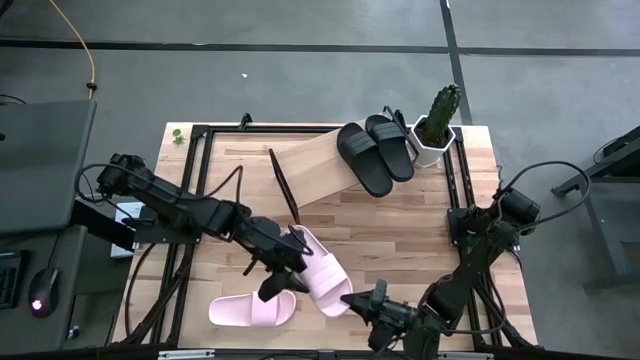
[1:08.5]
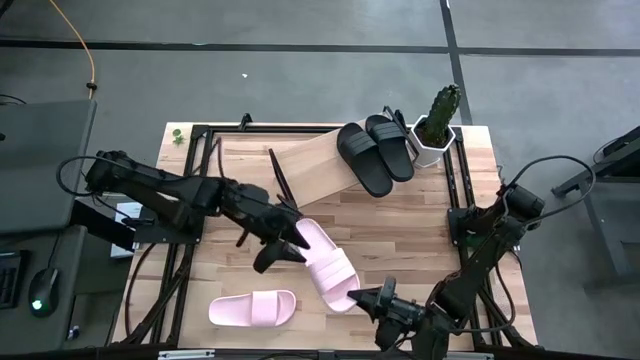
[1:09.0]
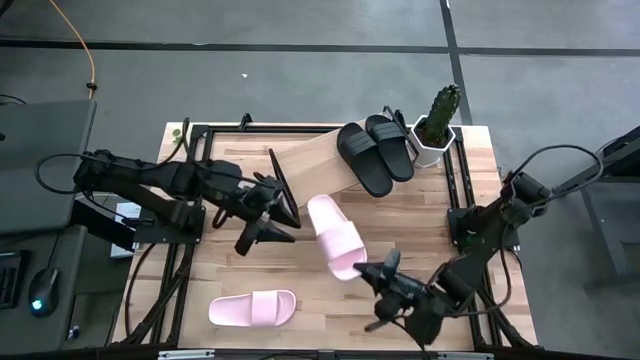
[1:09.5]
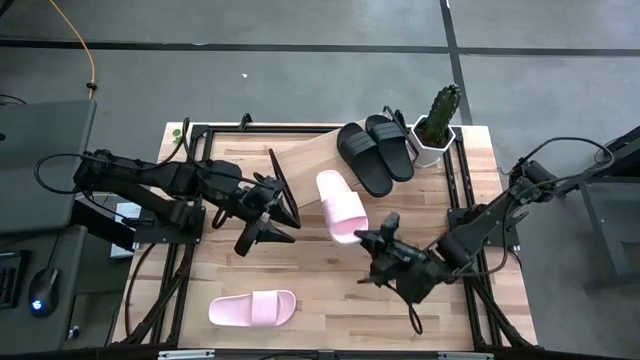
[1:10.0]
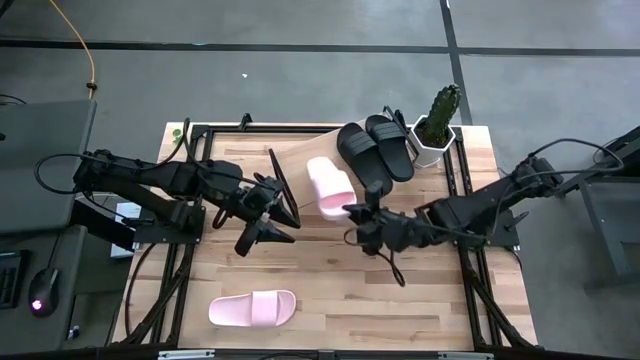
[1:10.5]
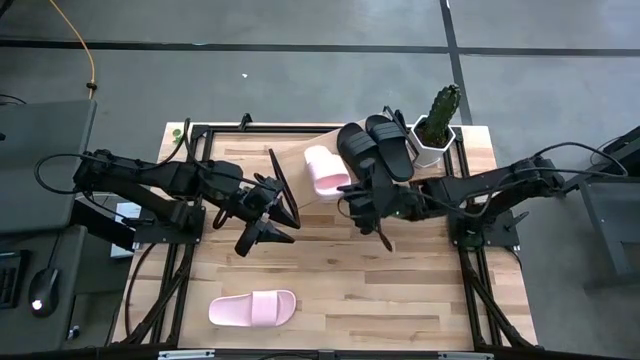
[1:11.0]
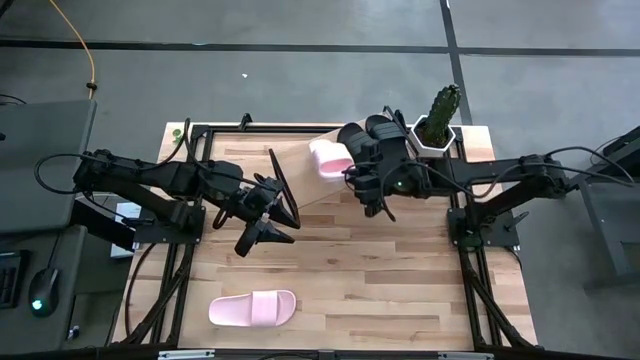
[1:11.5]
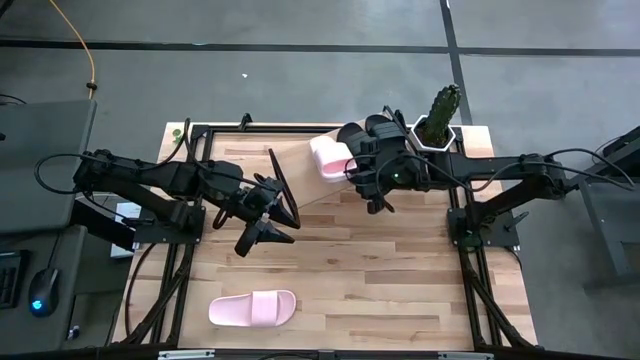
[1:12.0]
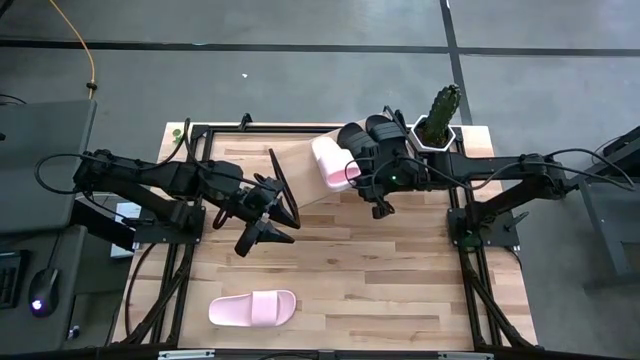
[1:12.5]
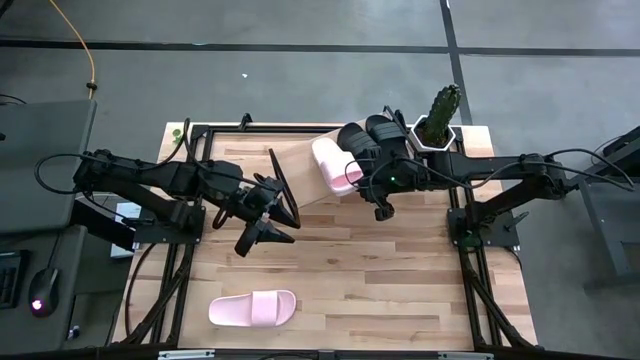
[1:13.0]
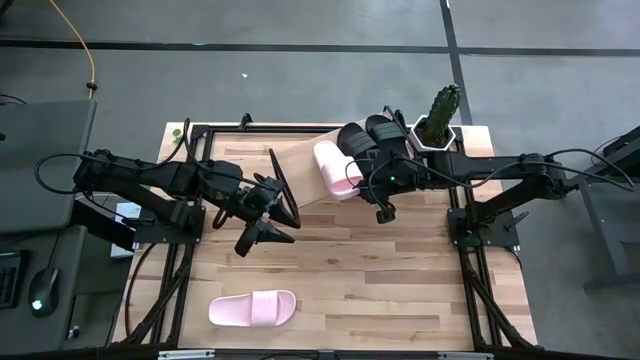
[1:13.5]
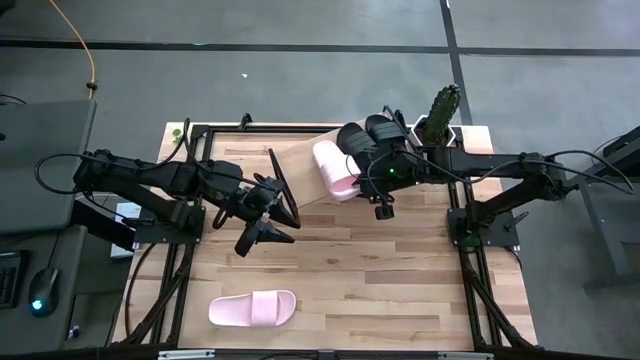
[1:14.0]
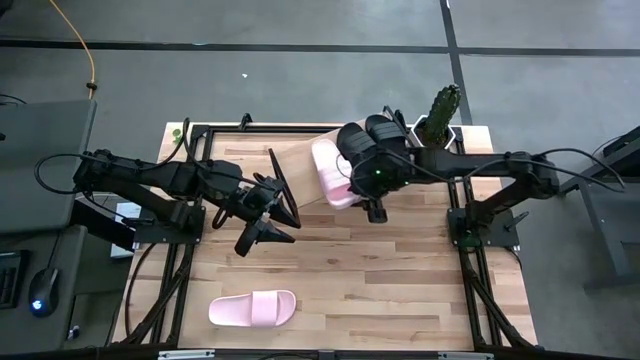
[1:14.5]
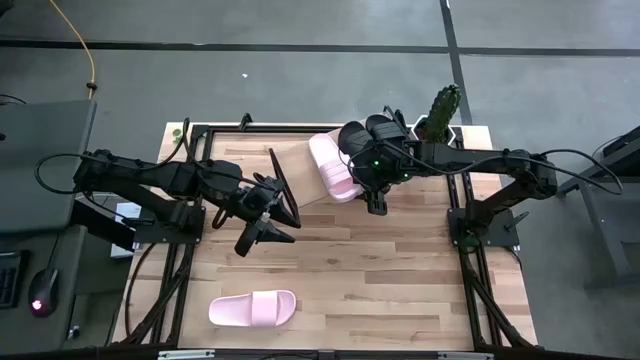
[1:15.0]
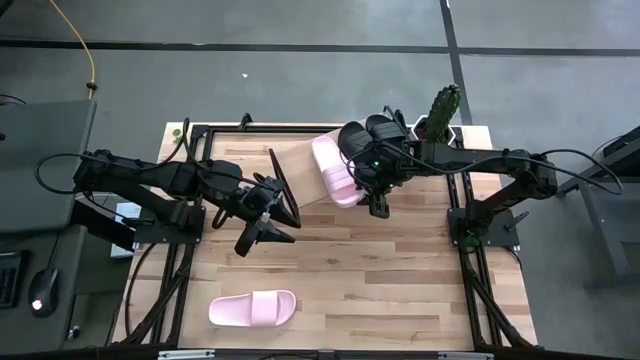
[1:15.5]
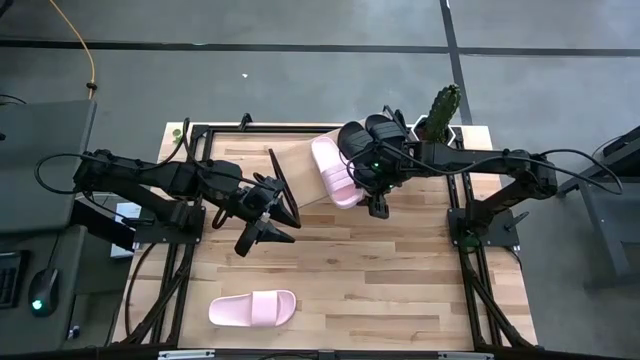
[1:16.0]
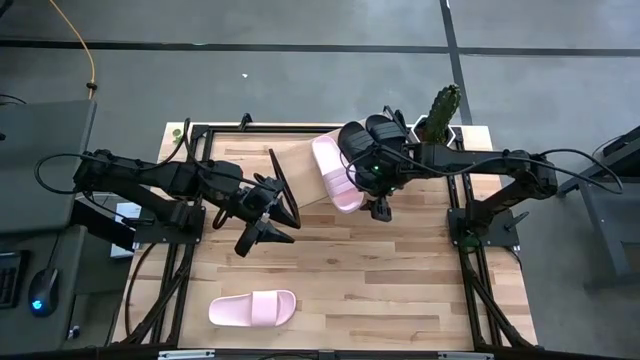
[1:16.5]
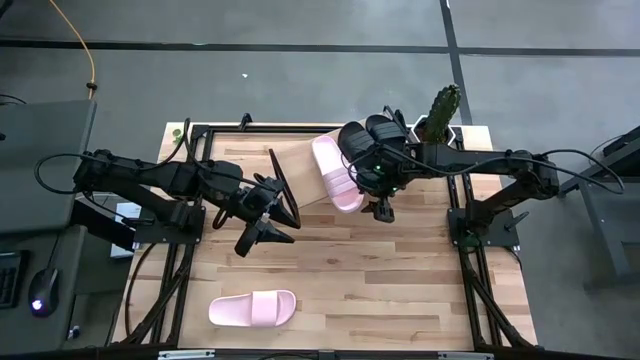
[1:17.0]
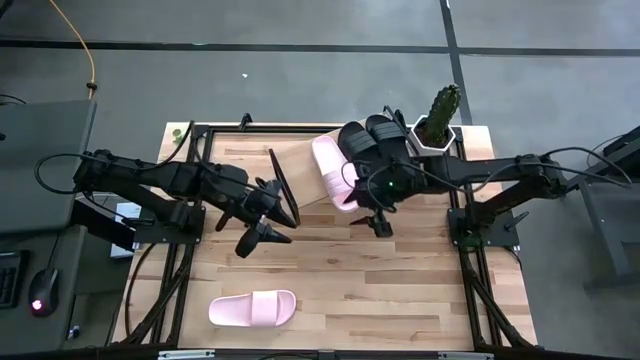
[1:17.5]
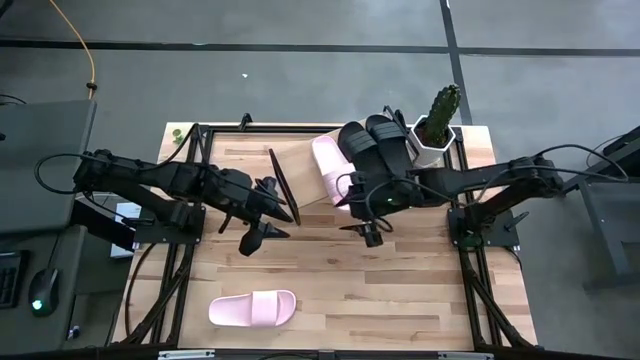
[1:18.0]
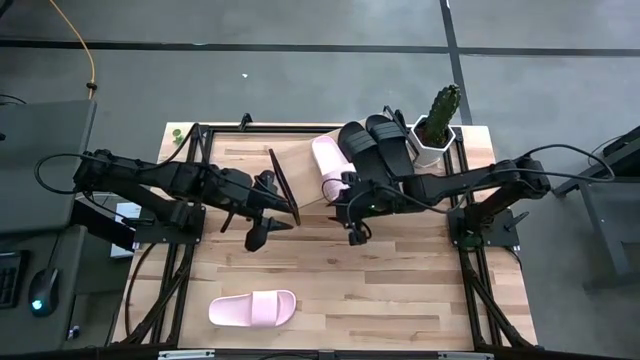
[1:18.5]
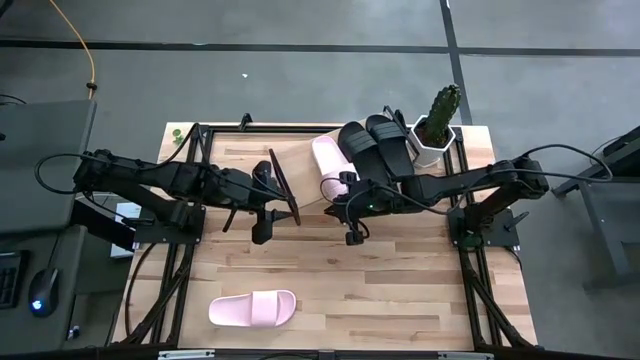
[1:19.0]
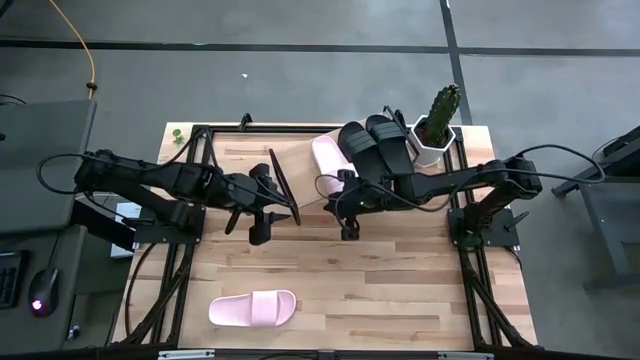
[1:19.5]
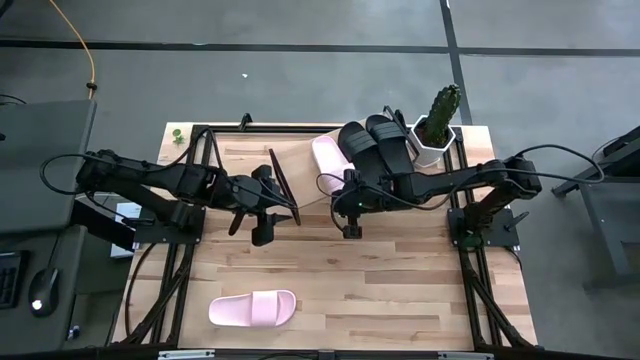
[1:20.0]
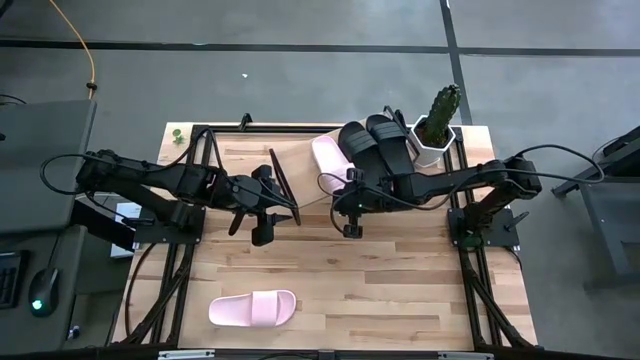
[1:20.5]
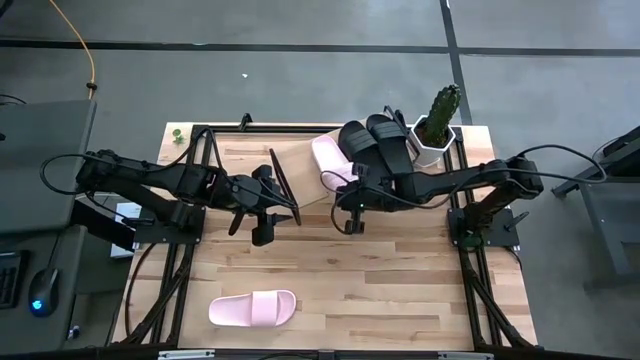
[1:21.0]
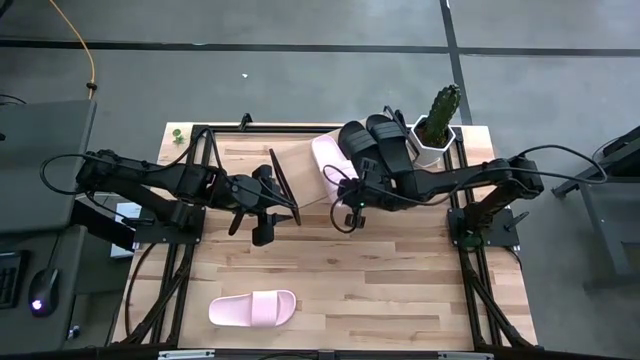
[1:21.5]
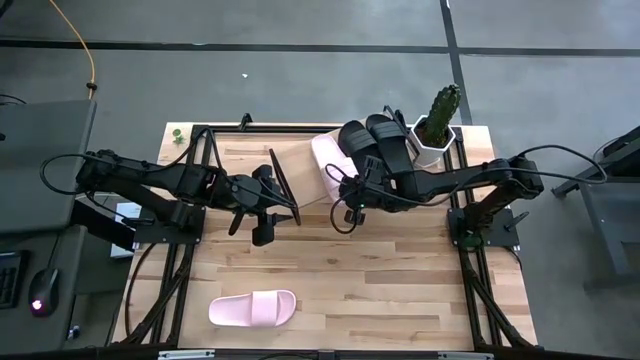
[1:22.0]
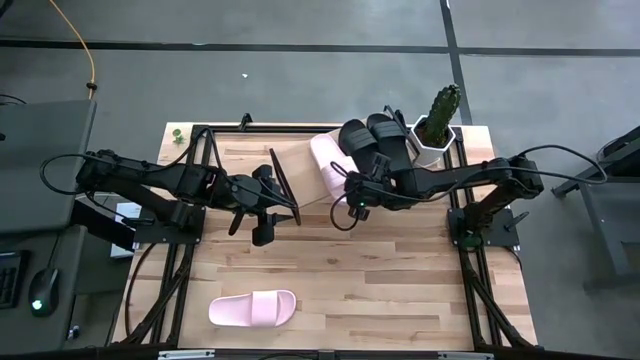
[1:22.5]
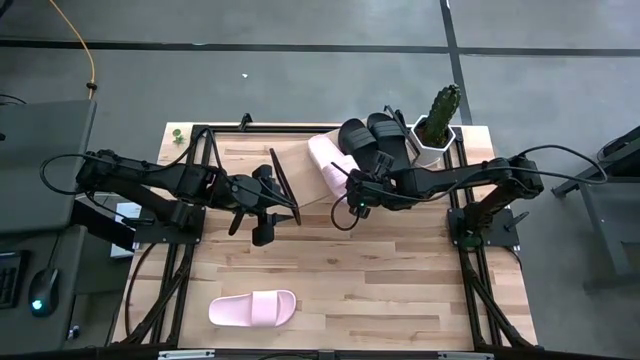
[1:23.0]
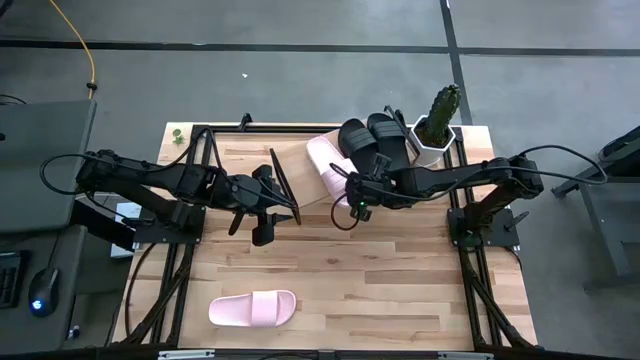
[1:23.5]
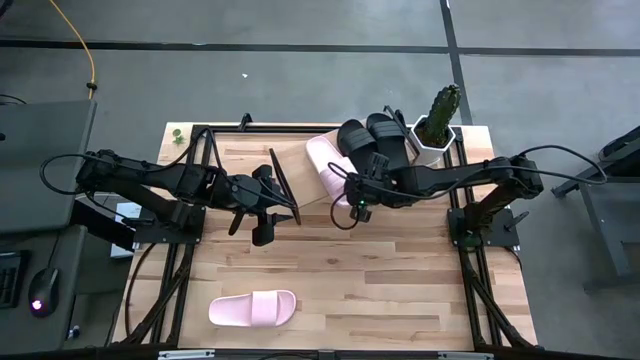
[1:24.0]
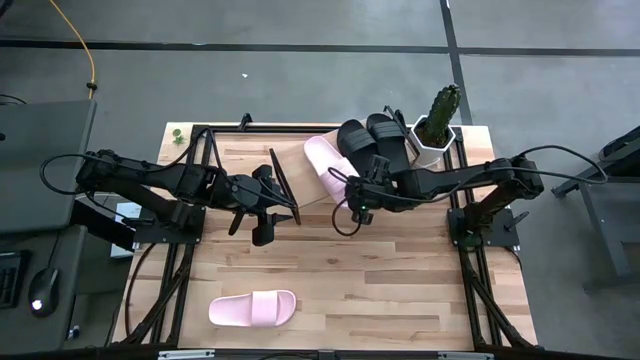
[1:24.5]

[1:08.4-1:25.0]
Task: Pick and place slides into the shelf
Put the right pink slide on the shelf
